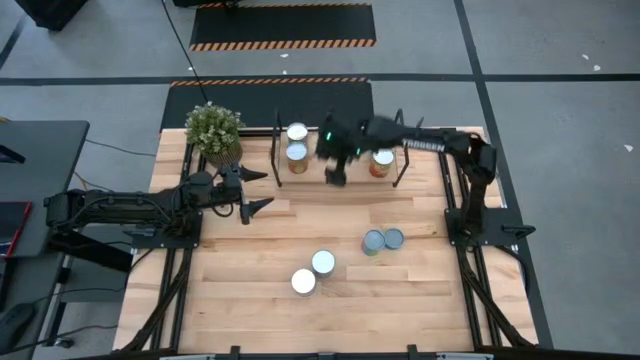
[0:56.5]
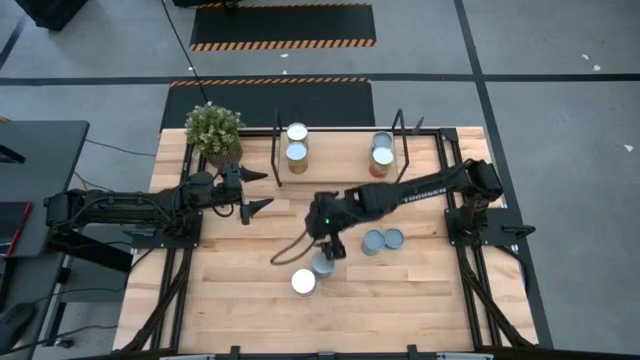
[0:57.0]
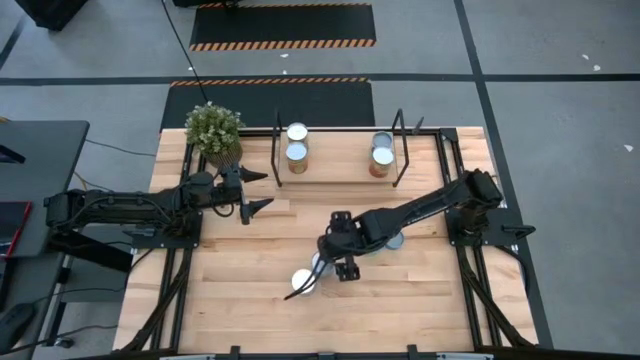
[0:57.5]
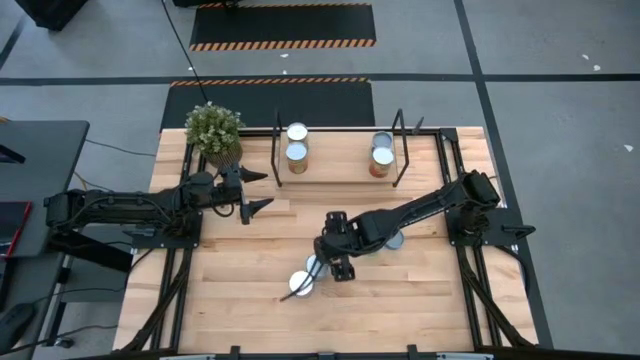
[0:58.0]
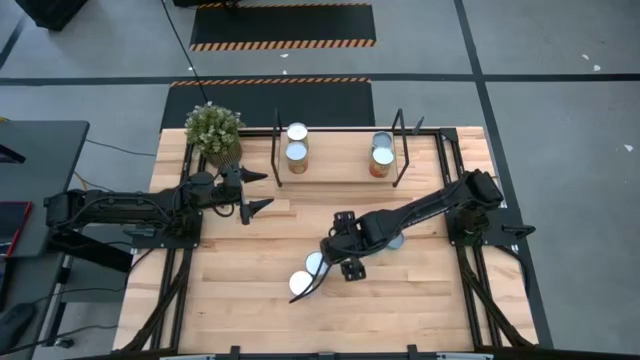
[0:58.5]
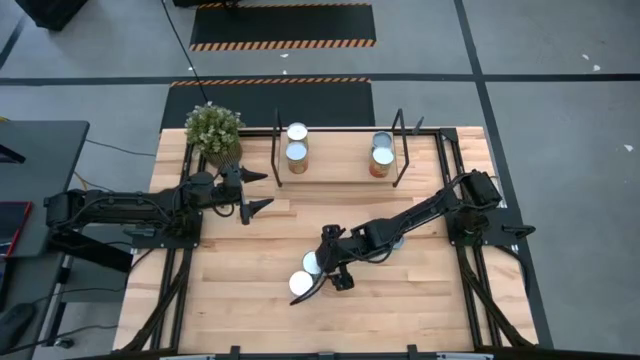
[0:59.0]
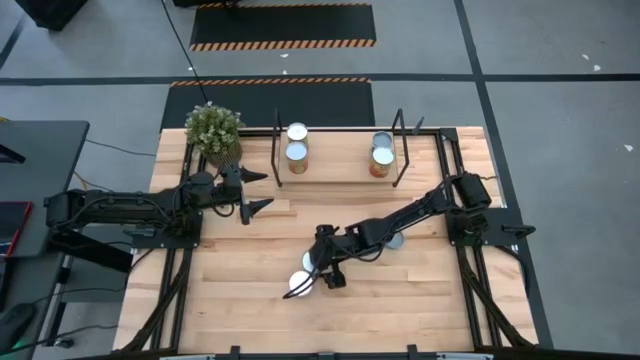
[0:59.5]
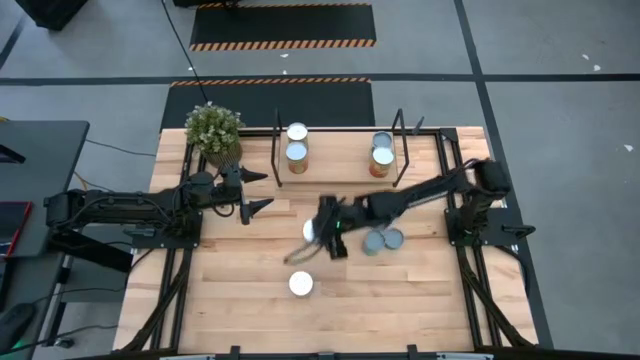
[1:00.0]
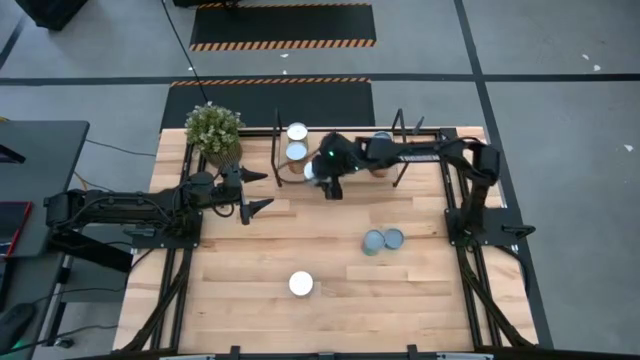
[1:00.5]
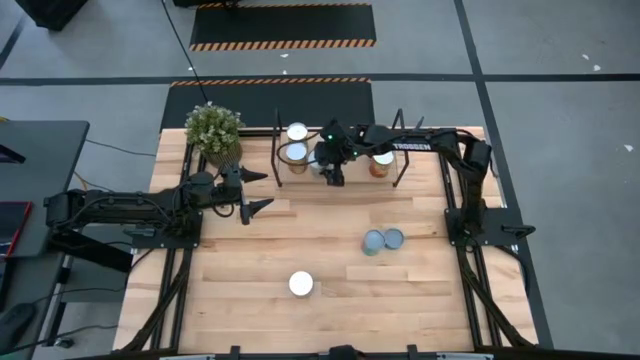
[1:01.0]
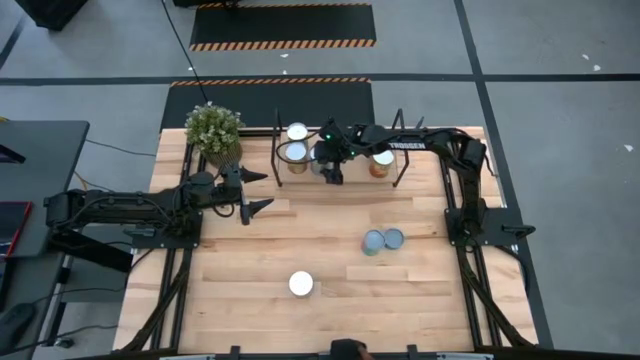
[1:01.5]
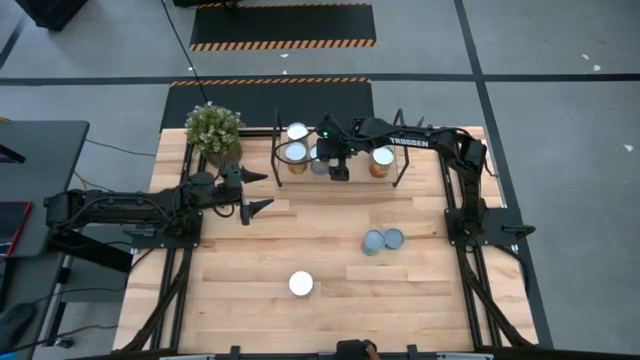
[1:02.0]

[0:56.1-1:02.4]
Task: Pick and place cans onto a shelf
Put the canned cherries on the shelf

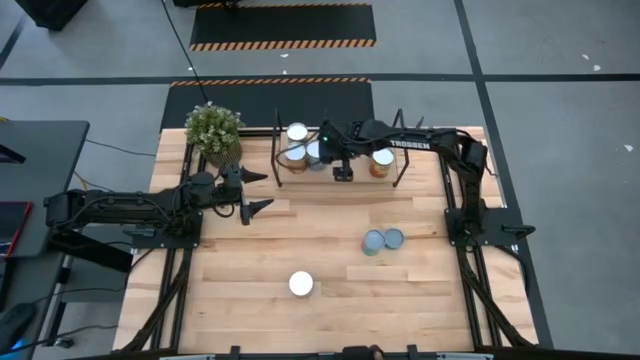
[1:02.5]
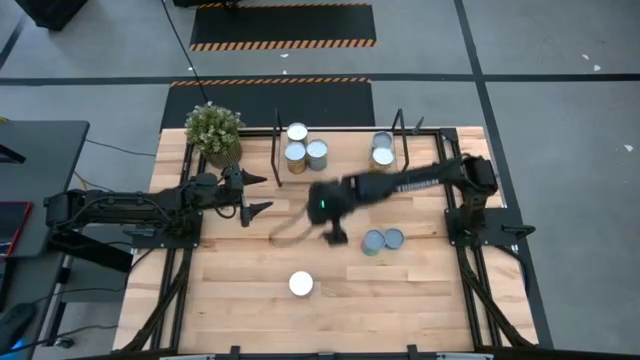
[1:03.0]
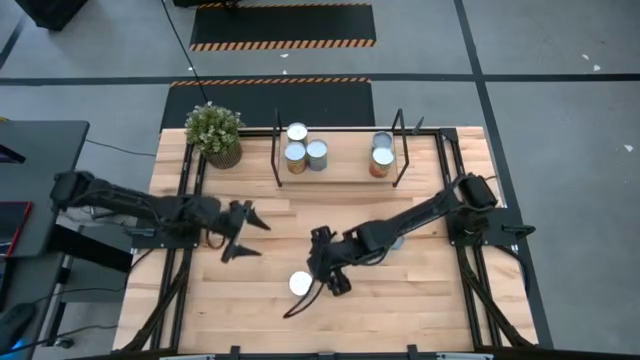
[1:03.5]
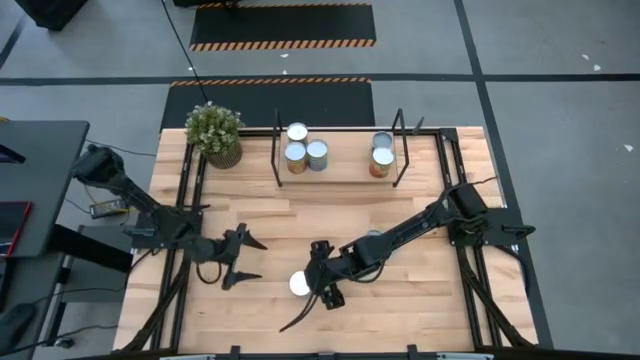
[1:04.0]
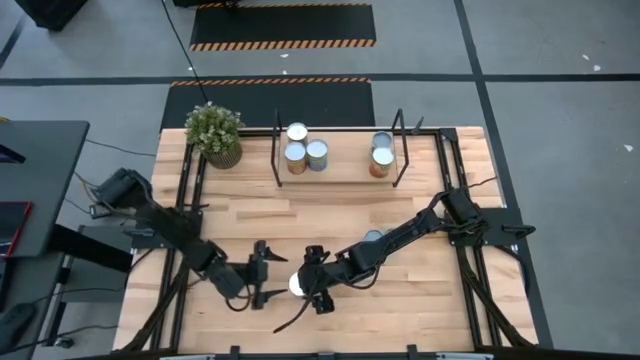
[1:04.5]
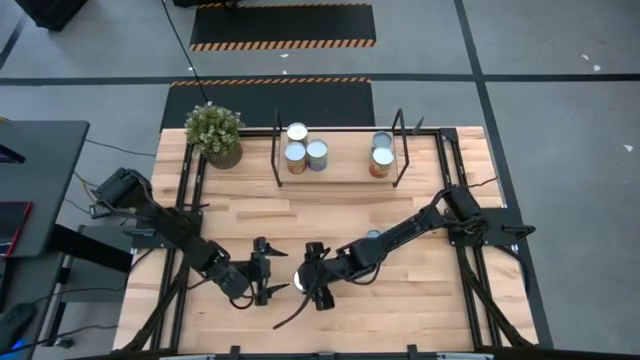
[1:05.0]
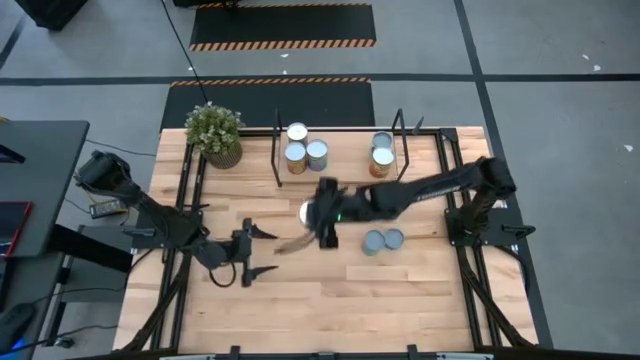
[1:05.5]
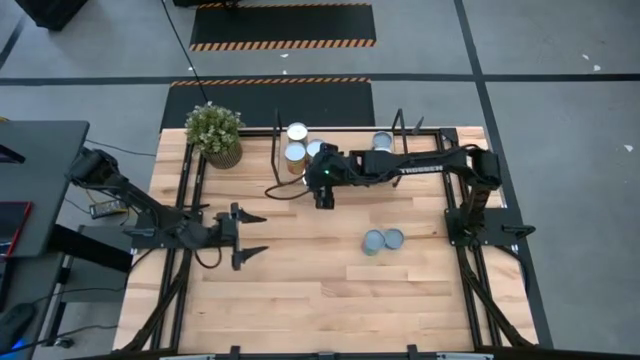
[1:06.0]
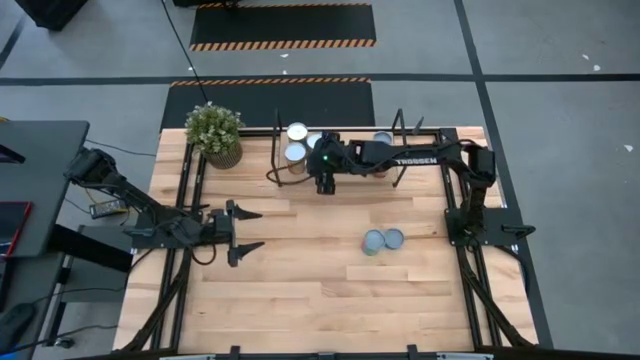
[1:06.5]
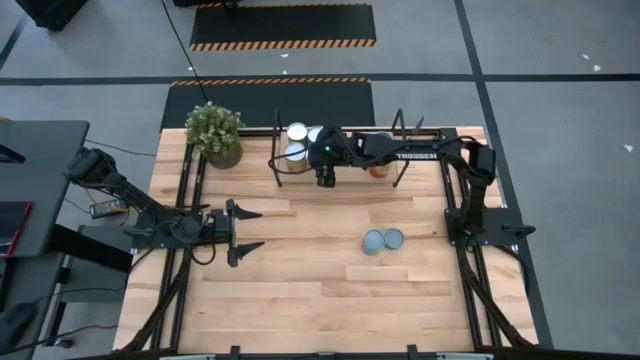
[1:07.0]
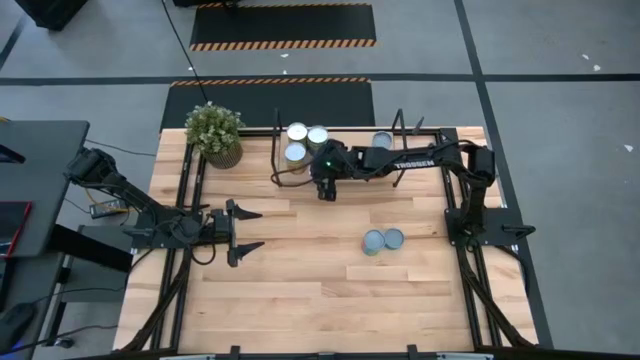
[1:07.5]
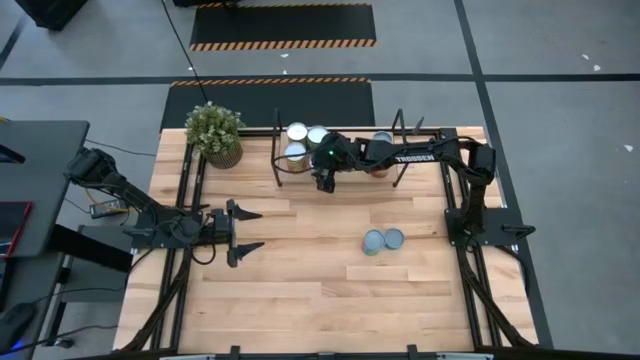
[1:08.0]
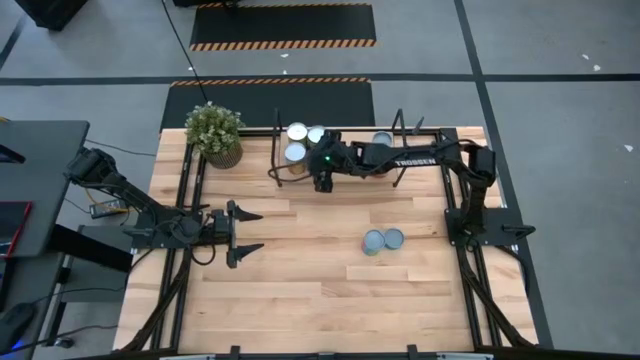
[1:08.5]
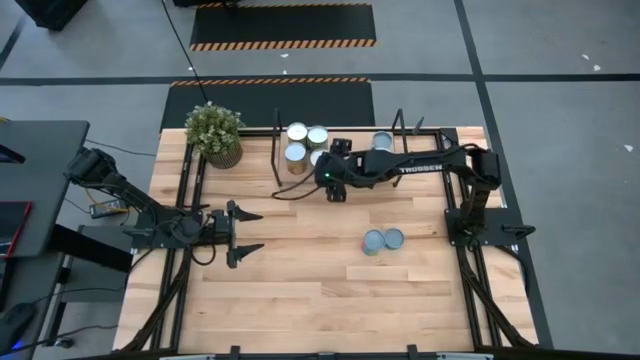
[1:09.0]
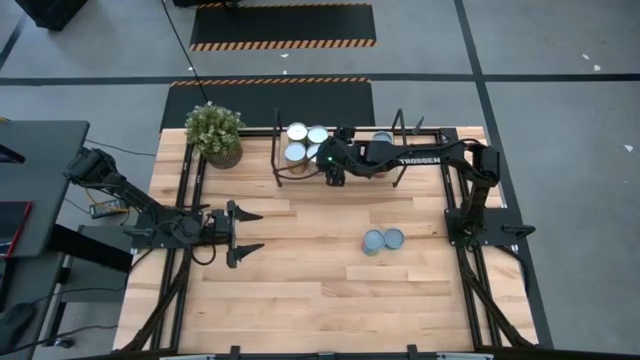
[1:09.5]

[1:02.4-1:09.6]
Put the canned peaches on the shelf

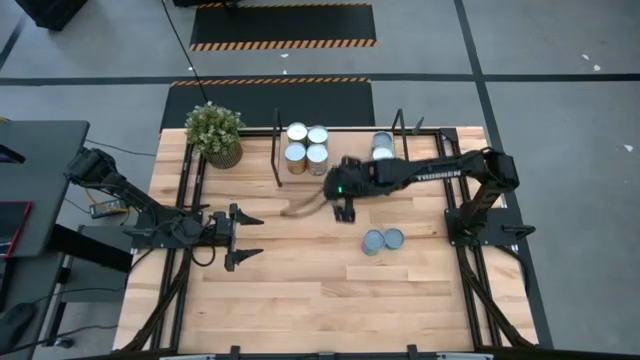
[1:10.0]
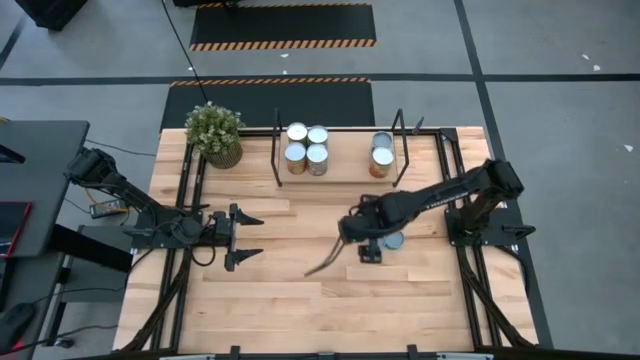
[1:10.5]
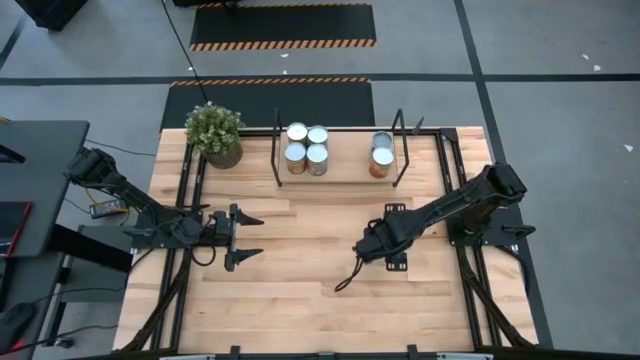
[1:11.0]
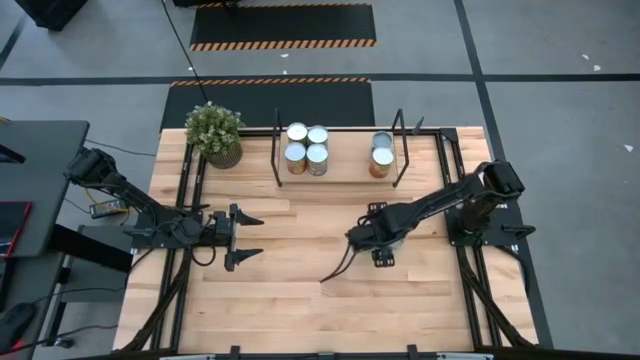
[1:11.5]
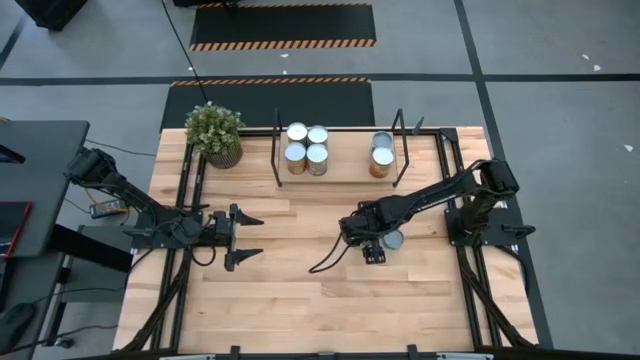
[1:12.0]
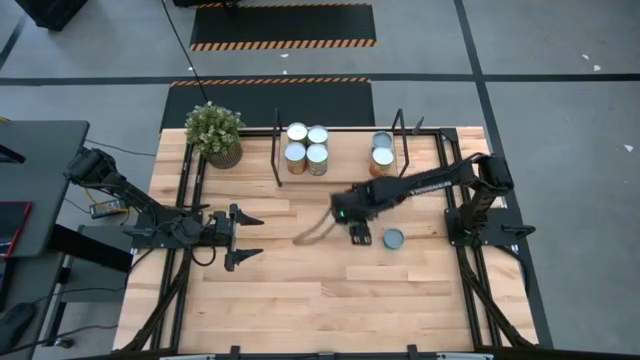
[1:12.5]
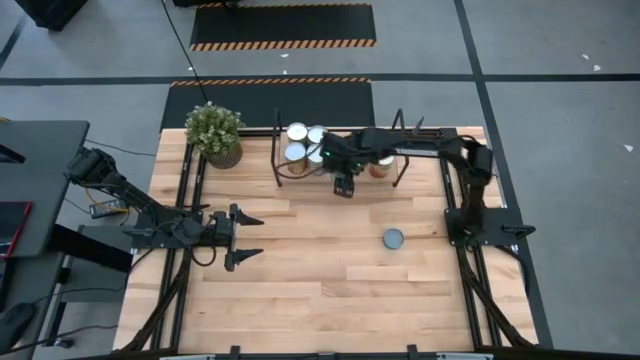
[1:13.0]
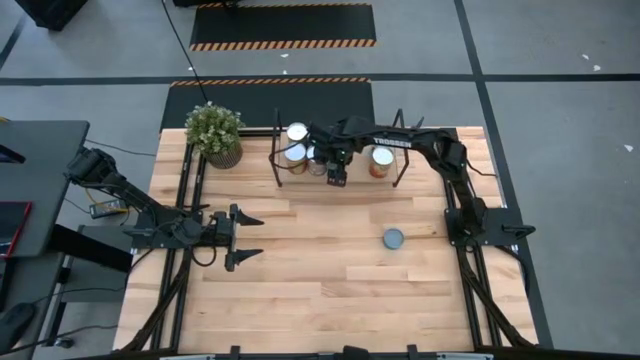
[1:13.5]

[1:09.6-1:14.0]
Put the canned chicken soup on the shelf

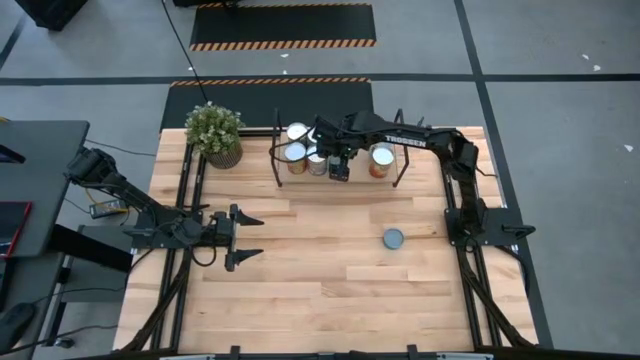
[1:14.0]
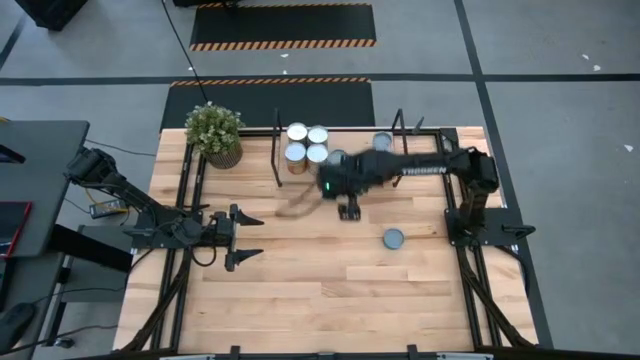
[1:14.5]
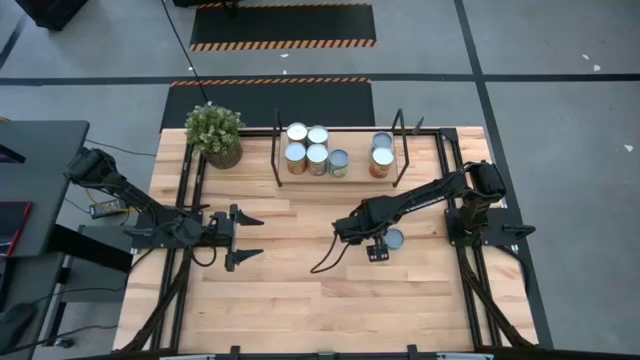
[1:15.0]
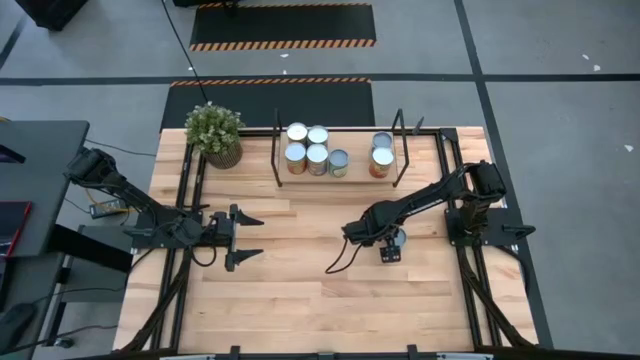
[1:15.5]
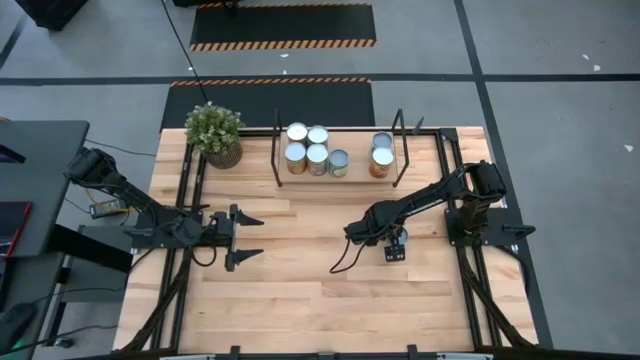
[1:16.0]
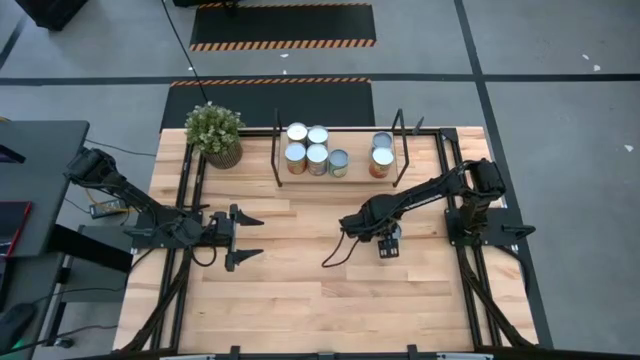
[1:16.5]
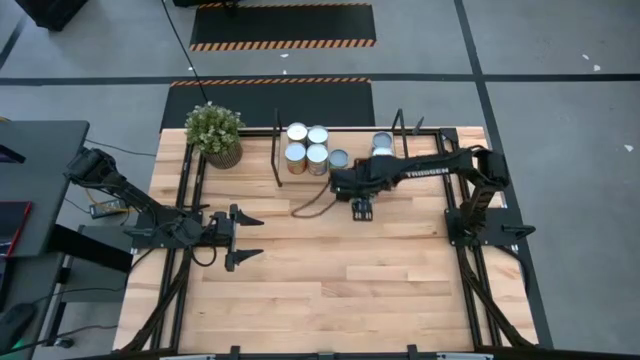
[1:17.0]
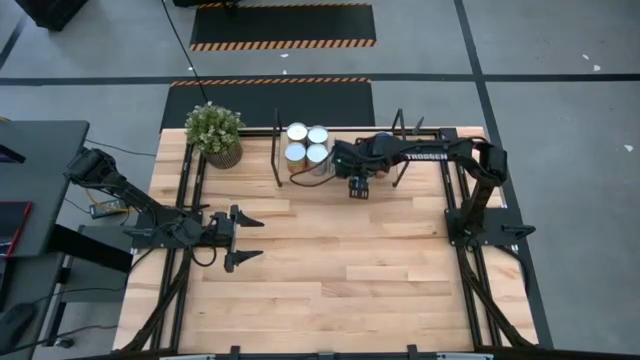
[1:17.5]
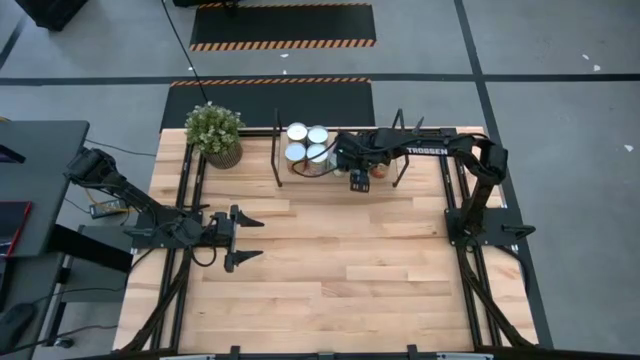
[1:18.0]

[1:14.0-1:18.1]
Put the blue canned tuna can on the shelf
